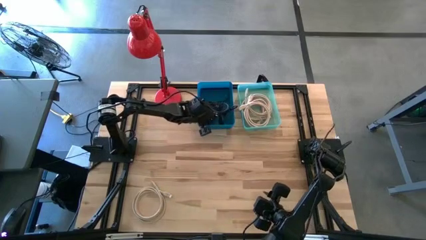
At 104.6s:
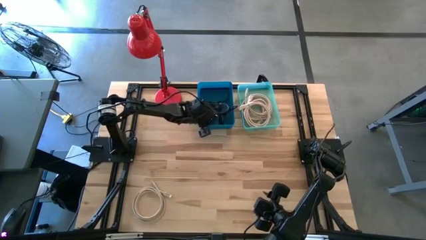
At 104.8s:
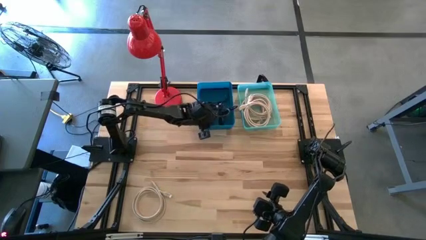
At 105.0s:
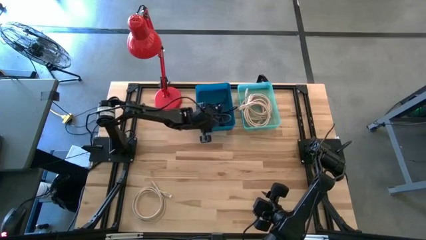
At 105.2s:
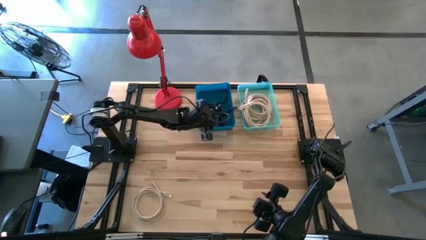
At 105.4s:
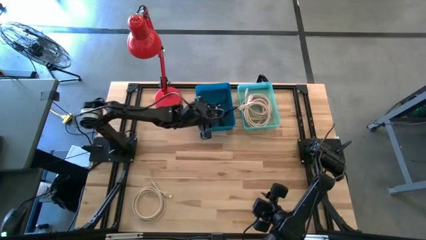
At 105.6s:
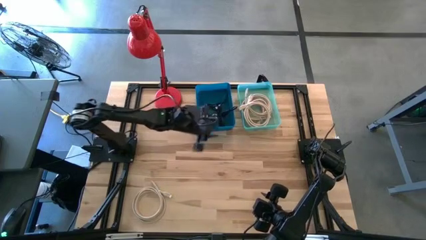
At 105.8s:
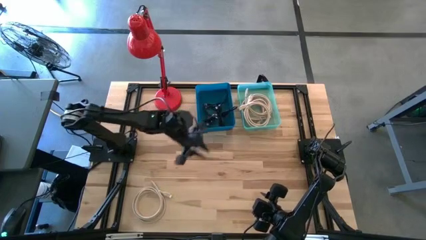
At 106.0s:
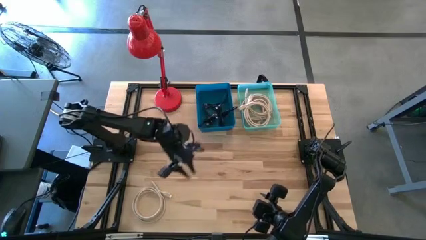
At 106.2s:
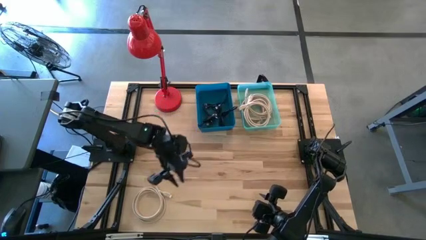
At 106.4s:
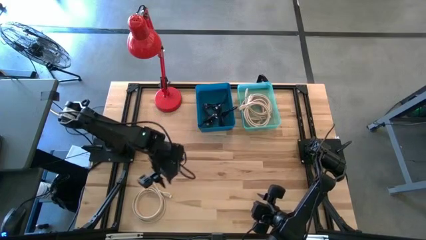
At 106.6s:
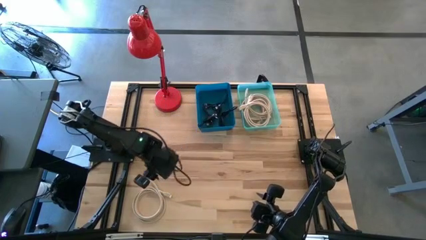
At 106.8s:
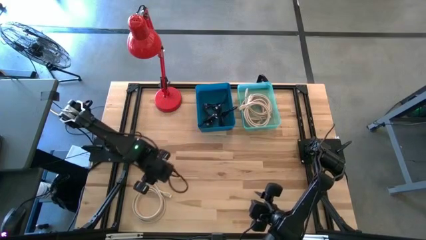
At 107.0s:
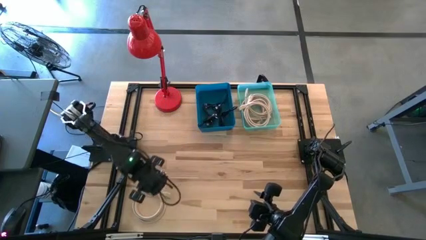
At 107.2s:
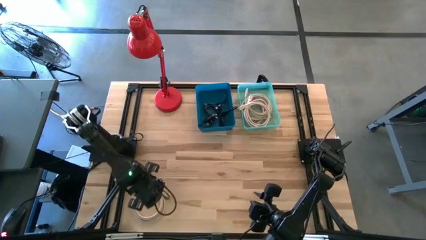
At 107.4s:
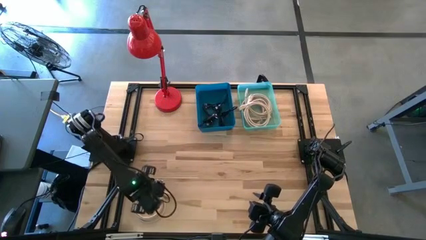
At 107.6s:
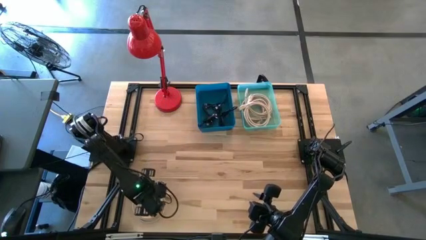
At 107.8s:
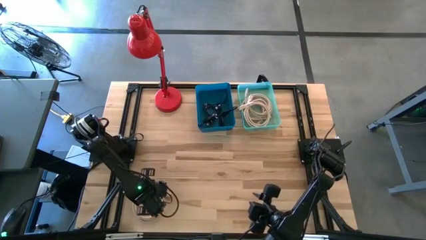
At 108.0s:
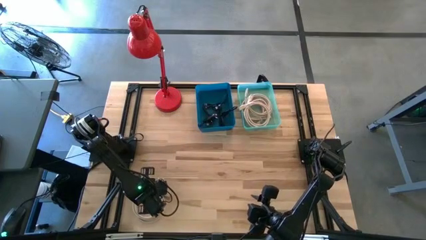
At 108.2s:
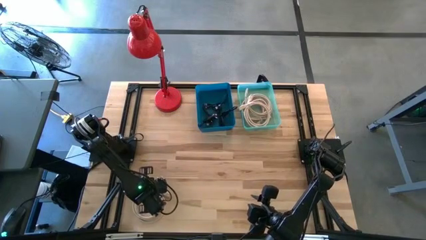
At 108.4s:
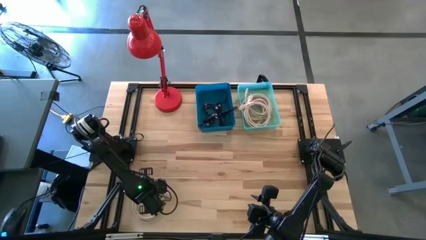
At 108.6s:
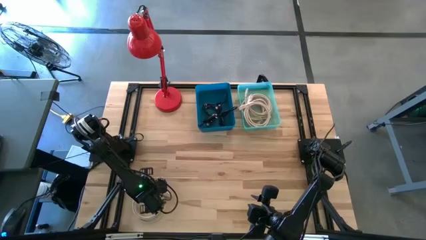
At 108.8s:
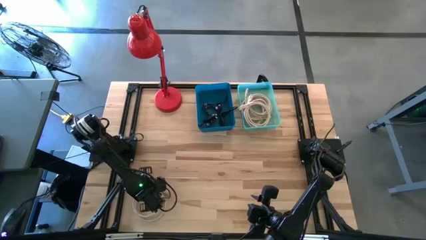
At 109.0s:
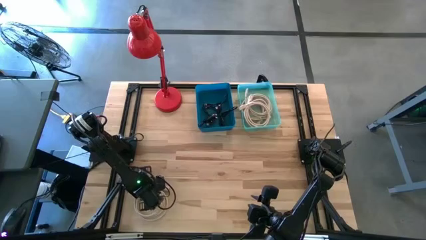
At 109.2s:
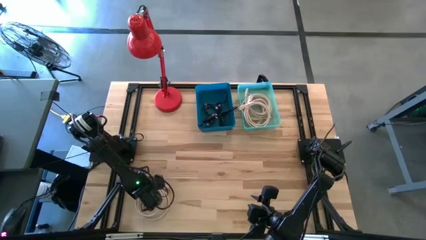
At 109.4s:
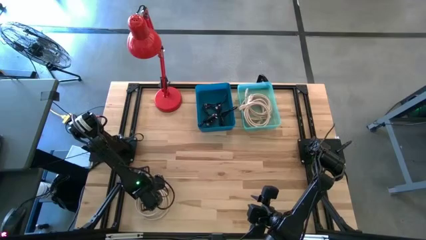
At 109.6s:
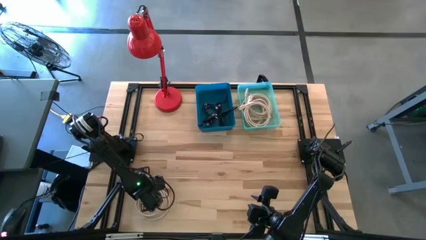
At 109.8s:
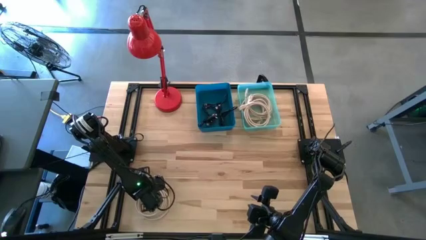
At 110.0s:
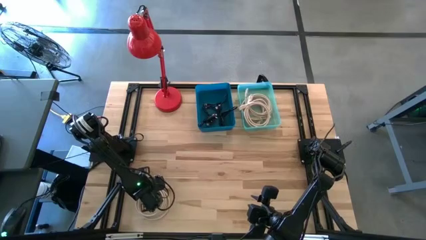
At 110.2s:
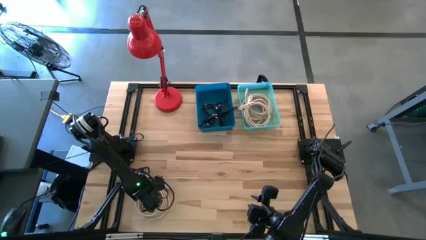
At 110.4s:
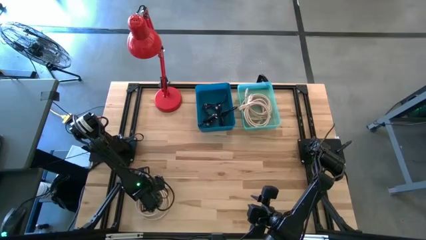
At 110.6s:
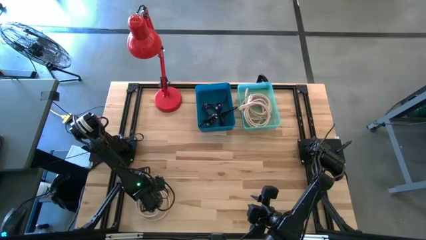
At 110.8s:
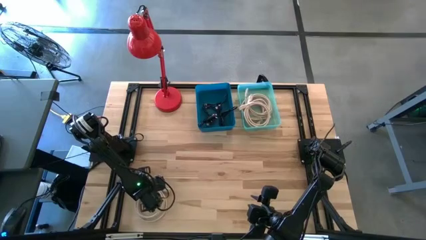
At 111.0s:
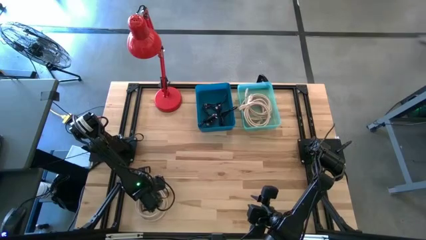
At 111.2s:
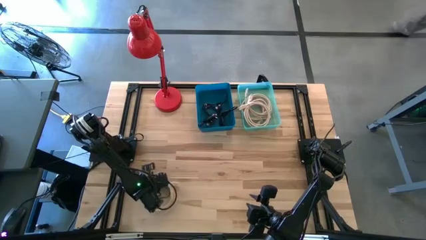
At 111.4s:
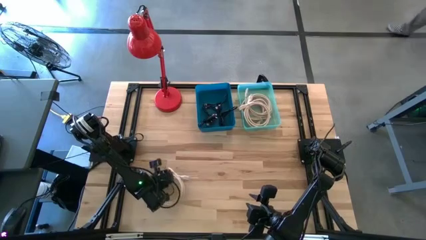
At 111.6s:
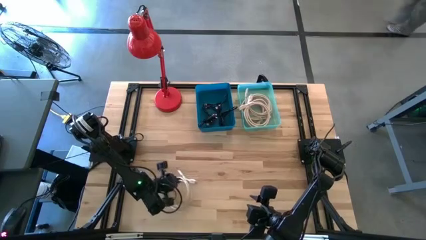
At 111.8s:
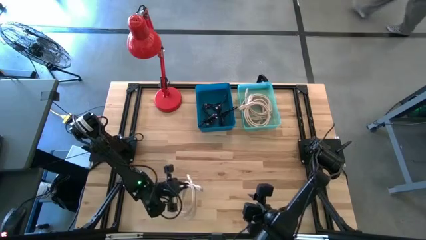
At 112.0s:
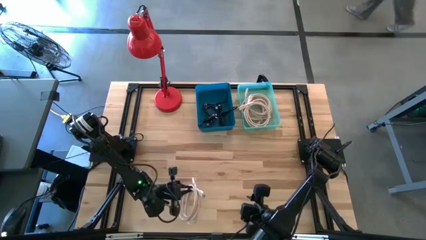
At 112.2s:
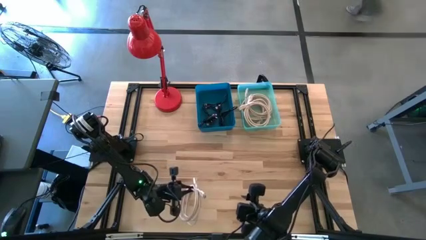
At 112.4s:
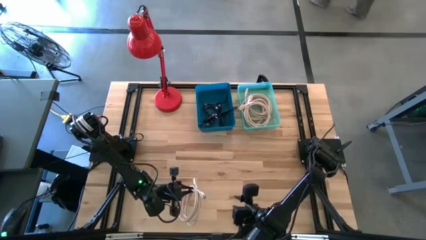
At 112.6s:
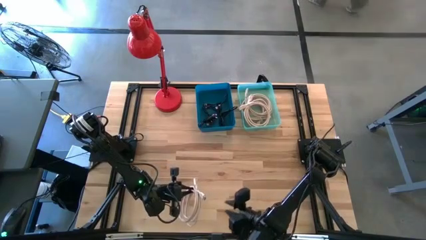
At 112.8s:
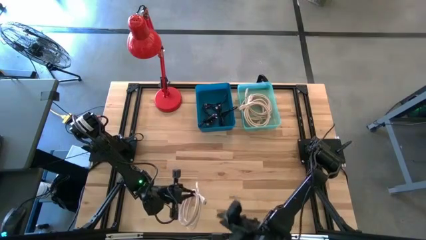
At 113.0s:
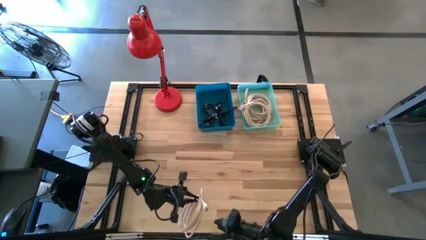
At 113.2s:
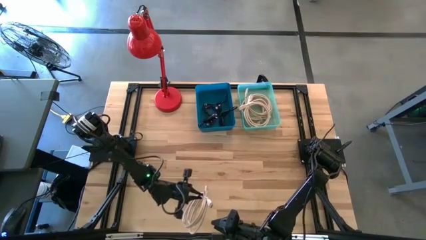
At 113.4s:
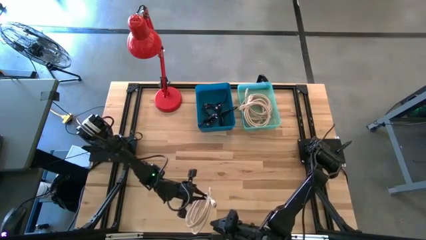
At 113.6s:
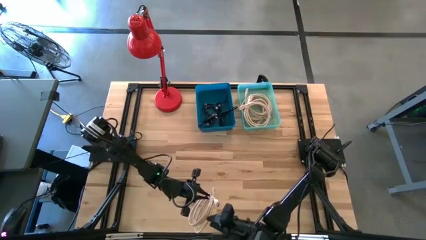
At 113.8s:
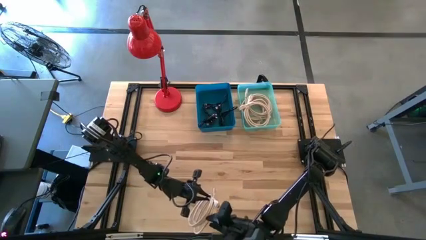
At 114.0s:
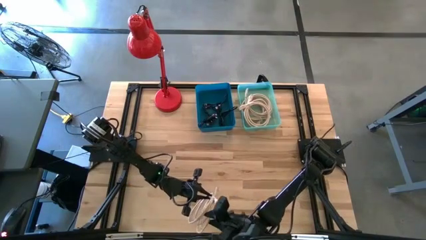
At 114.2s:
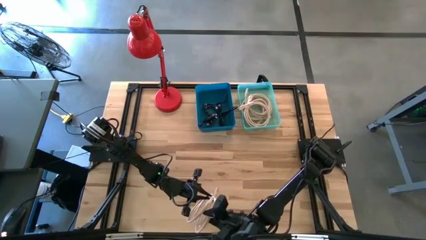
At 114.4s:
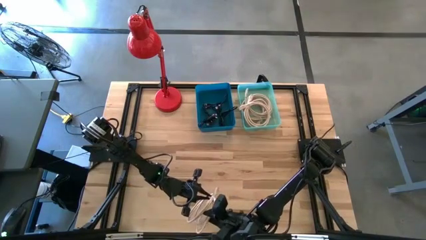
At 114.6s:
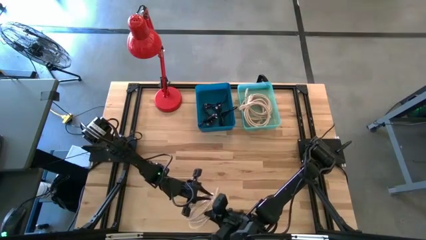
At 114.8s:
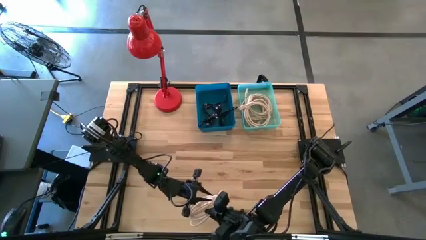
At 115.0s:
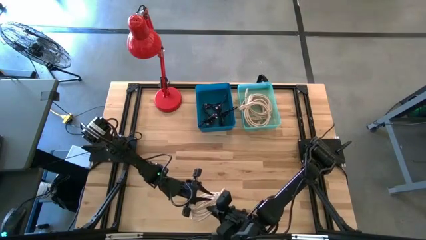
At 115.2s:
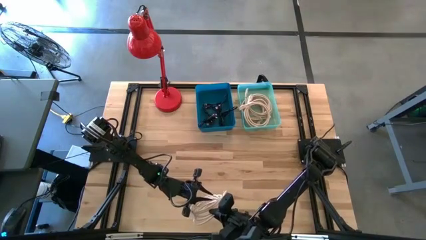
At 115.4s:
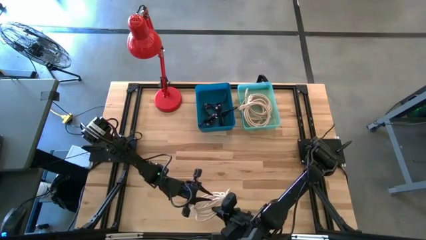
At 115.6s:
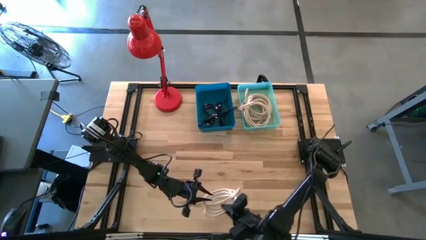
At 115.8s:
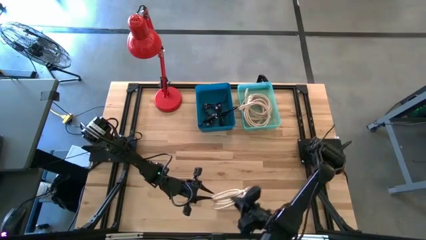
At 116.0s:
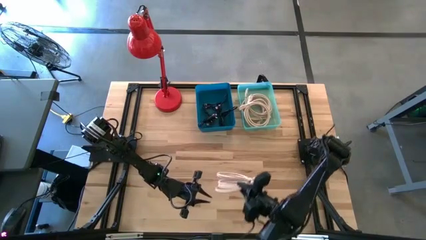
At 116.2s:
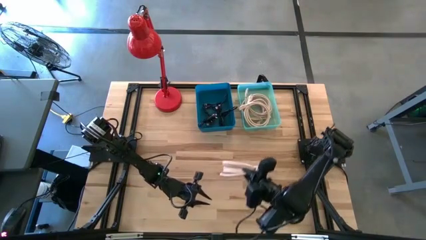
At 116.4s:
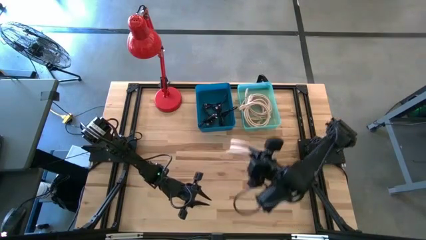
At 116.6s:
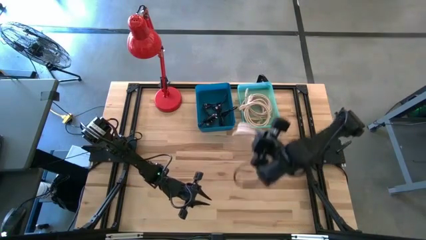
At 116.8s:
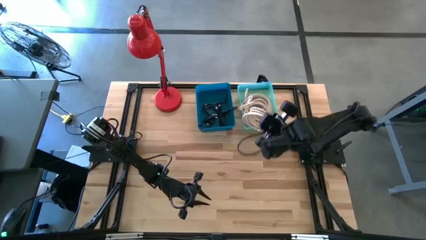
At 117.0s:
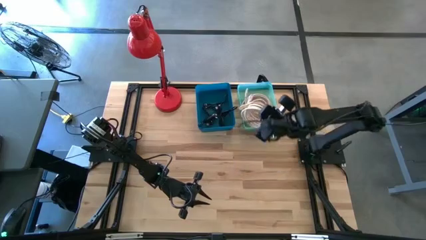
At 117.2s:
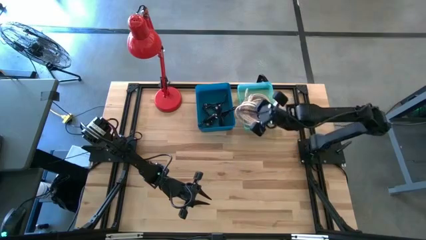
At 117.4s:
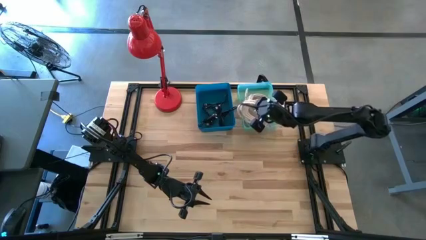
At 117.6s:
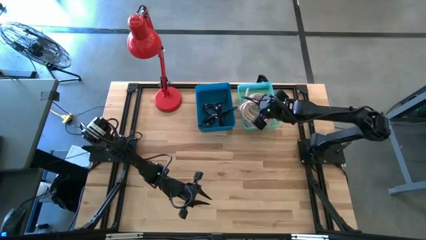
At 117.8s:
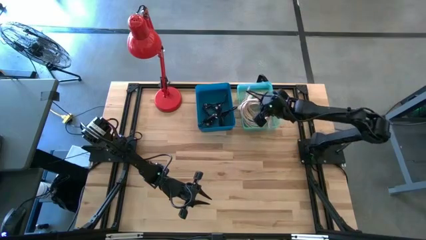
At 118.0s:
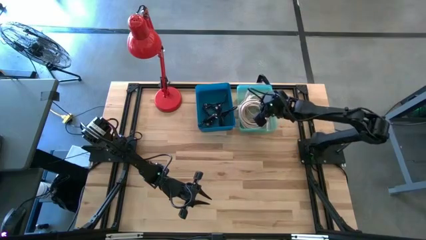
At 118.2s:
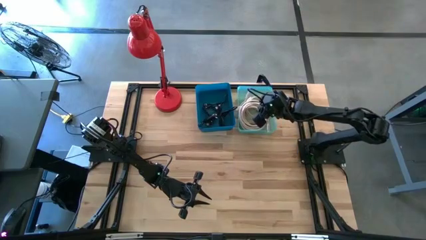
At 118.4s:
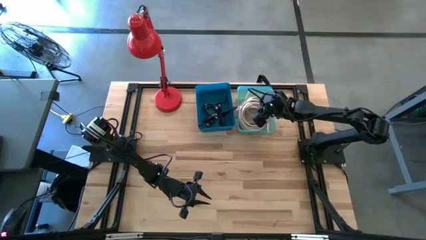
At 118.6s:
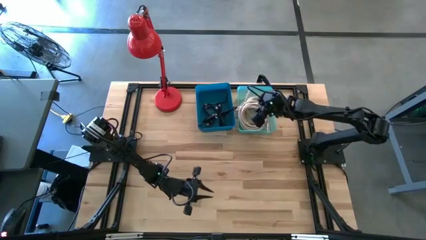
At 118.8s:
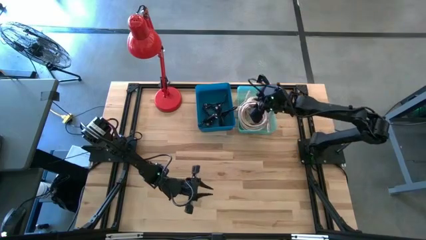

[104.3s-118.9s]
Task: Pick & Place USB Port
Put the brown HDMI cable into the green bin
